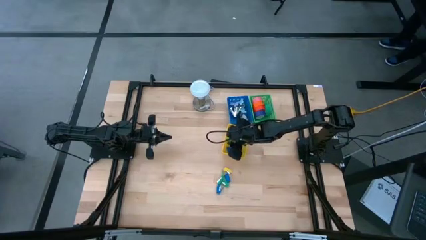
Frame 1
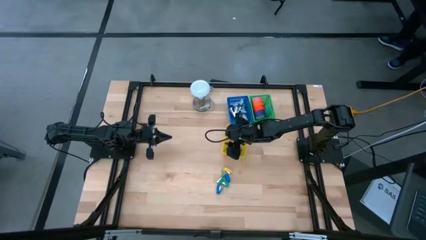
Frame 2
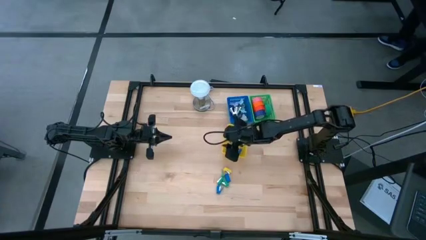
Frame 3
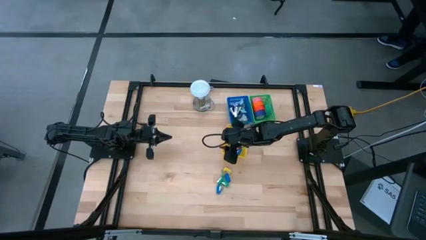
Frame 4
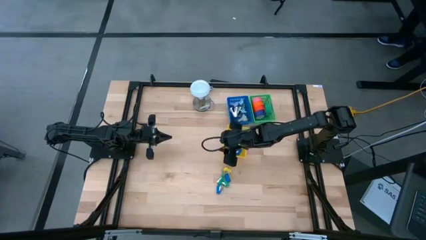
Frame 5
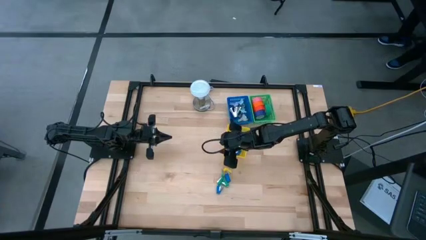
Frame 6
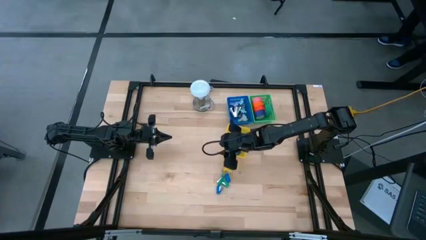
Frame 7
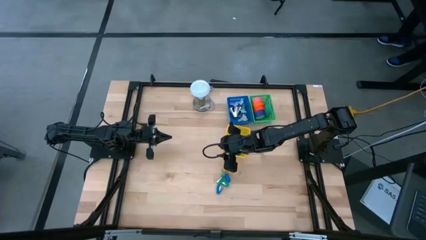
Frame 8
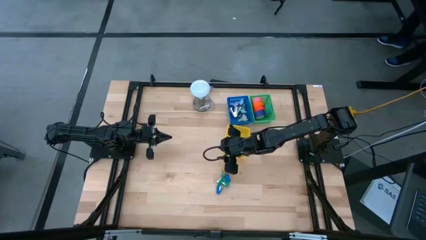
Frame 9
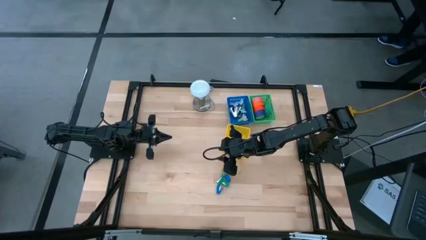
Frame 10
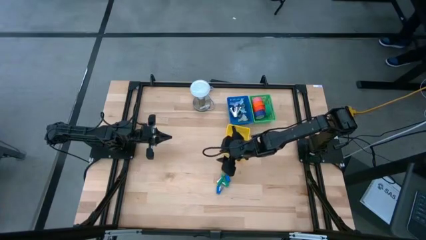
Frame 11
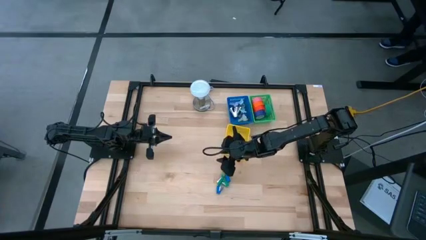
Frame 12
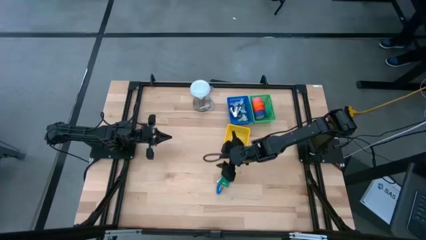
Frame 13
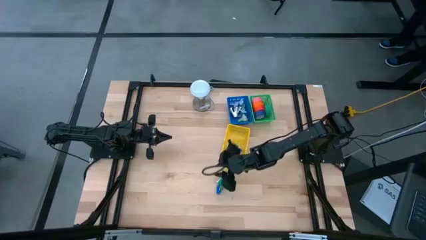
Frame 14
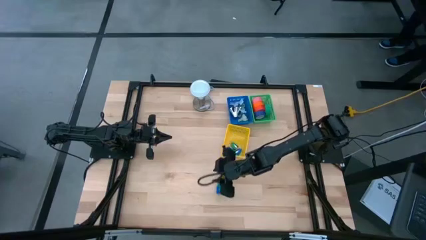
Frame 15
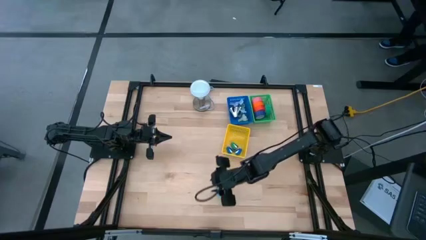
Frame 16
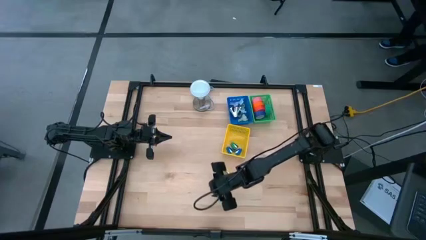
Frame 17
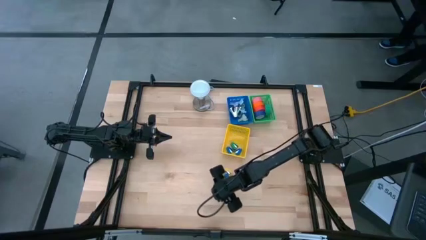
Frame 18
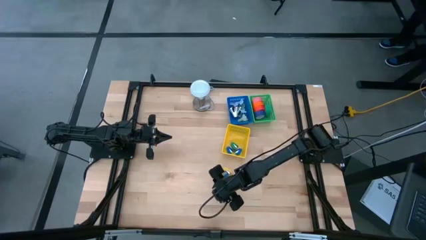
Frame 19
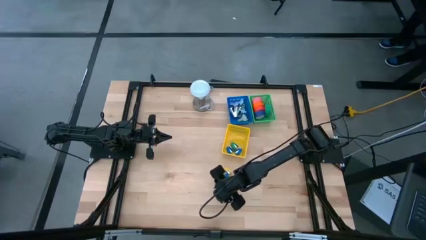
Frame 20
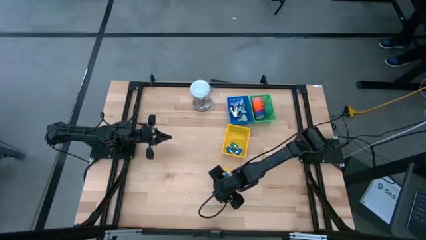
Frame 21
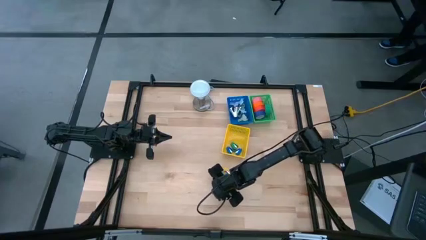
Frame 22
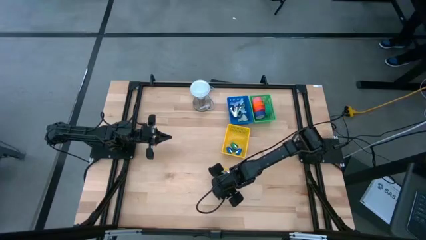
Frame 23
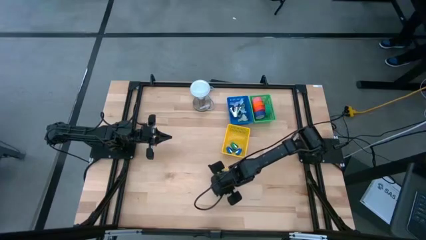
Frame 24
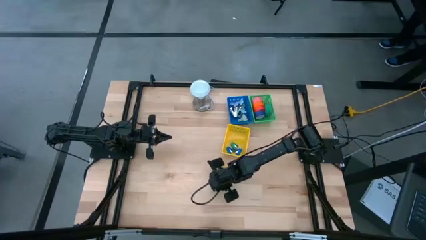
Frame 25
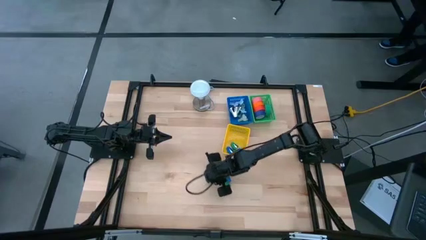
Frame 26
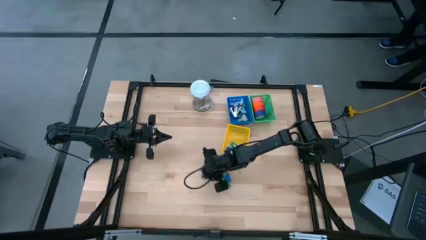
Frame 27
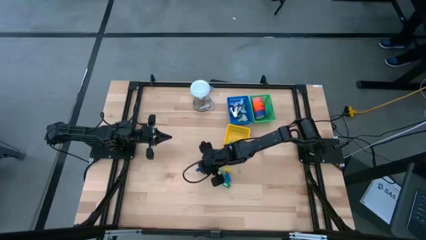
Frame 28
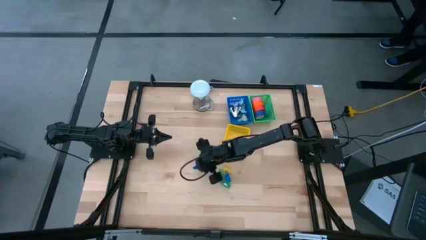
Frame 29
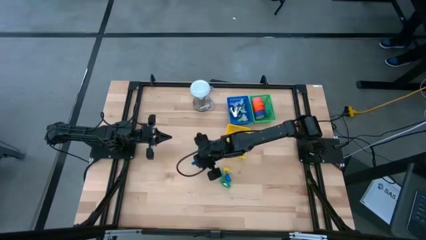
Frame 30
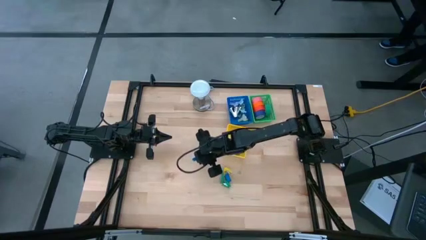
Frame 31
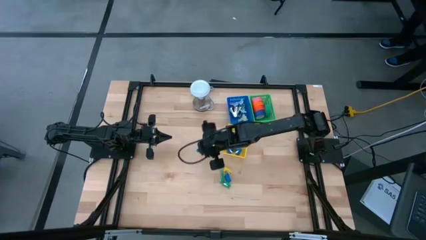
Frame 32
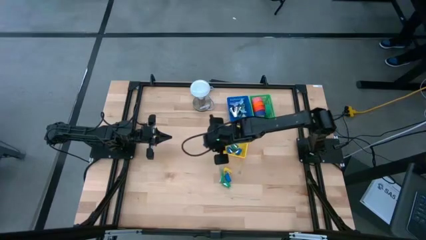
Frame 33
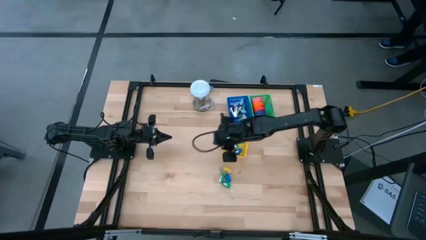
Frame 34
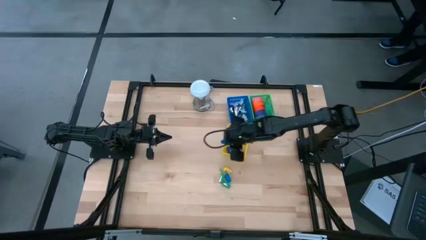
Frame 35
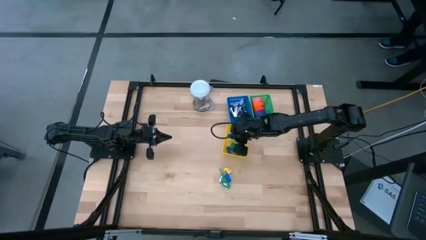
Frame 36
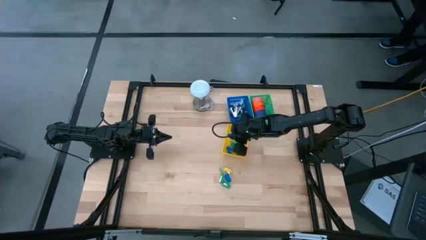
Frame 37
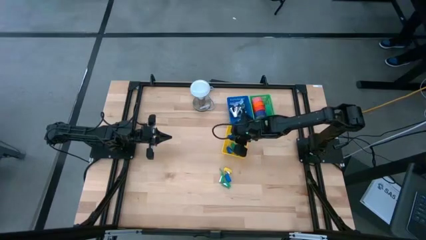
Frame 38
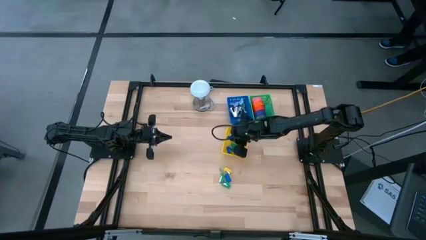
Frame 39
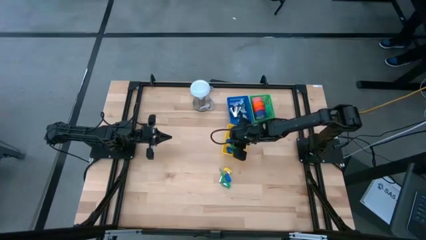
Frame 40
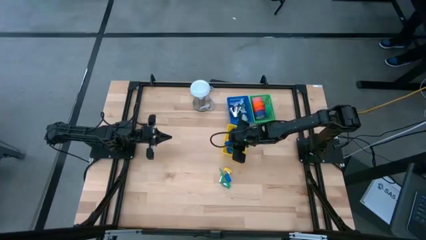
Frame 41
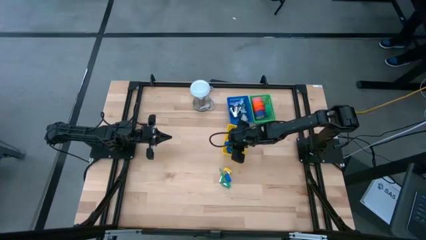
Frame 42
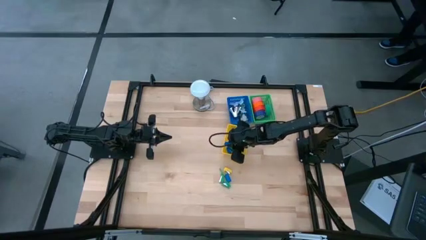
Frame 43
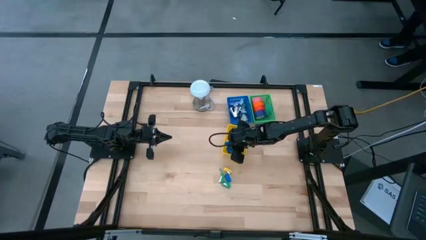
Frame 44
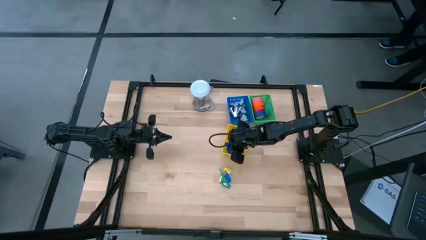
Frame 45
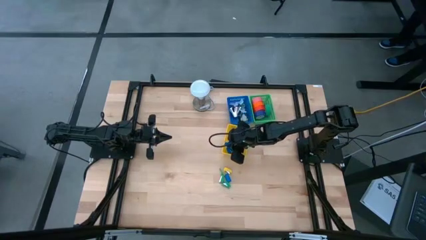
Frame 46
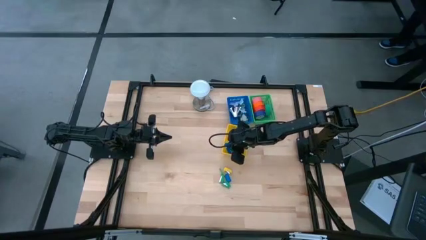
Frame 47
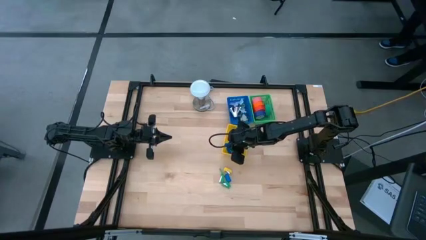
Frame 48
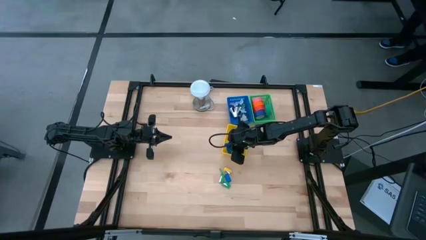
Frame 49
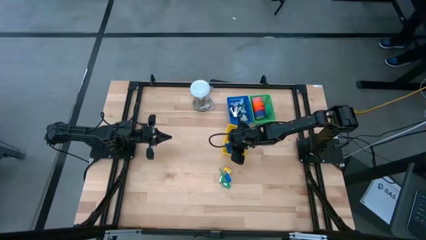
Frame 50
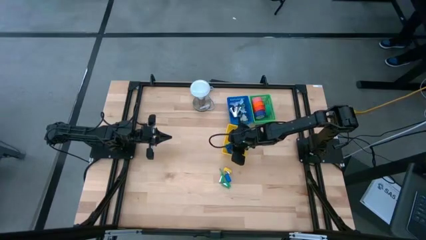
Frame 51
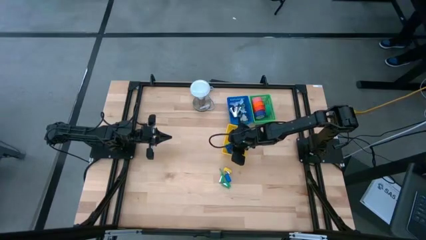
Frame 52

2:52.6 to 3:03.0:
Task: Pick and place Stapler, Stapler remover, tape
Put the blue stapler into the yellow bin

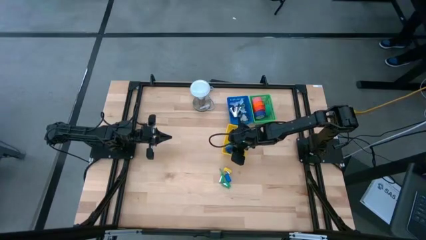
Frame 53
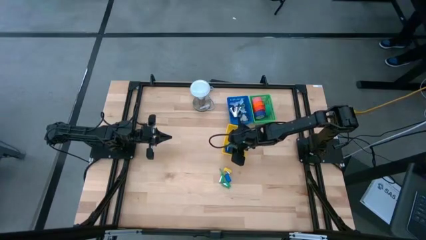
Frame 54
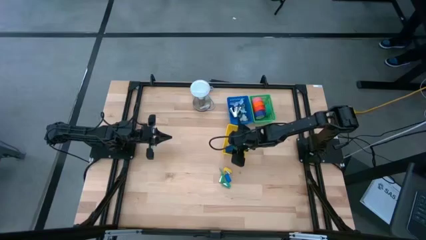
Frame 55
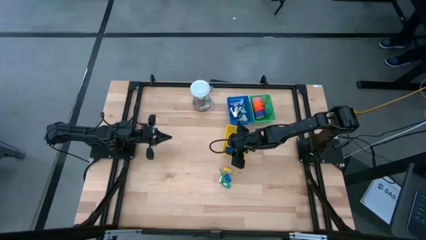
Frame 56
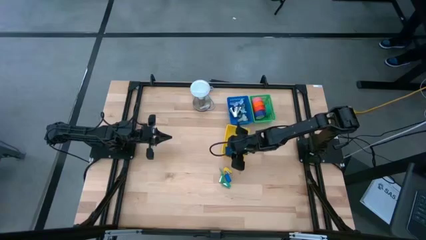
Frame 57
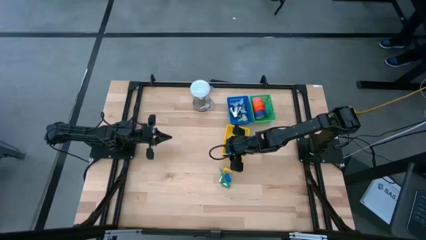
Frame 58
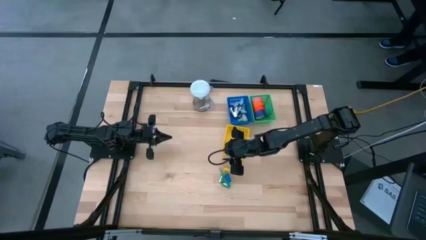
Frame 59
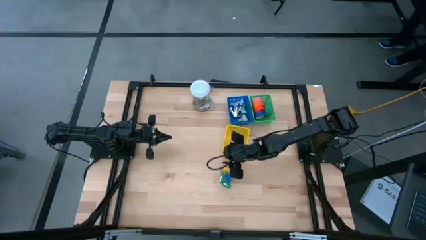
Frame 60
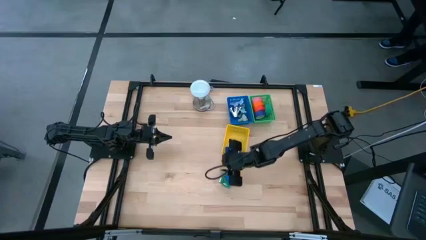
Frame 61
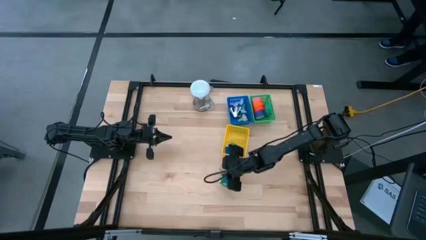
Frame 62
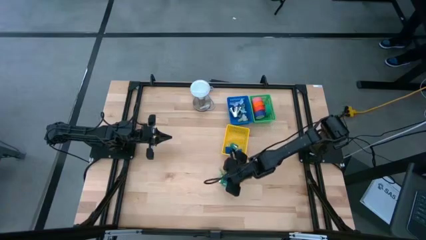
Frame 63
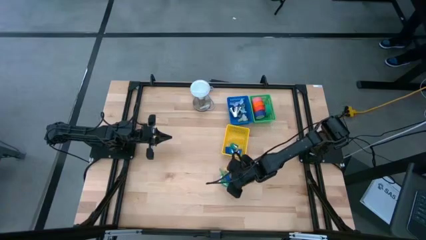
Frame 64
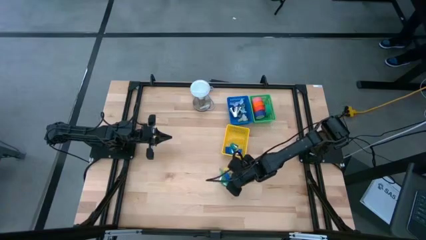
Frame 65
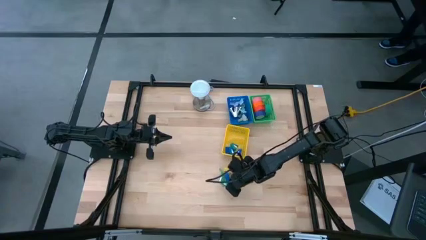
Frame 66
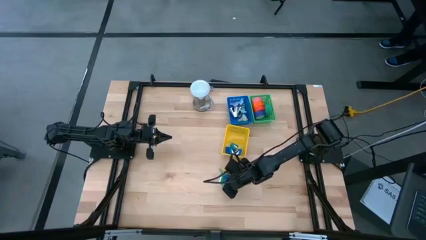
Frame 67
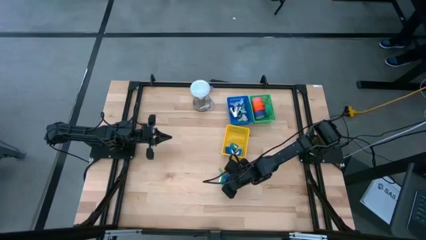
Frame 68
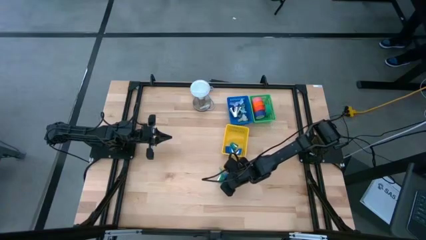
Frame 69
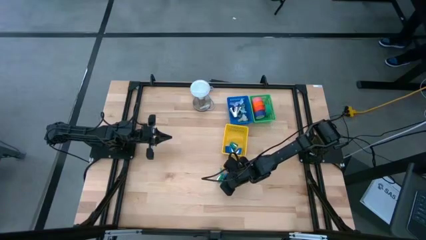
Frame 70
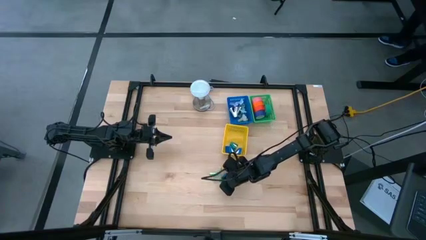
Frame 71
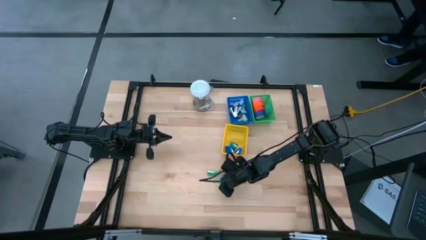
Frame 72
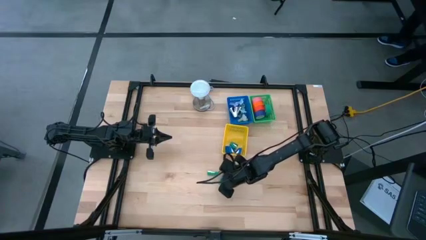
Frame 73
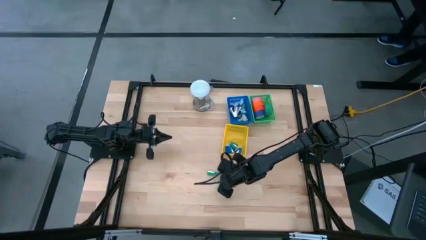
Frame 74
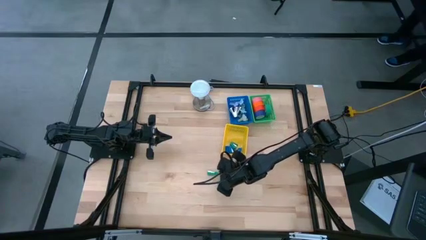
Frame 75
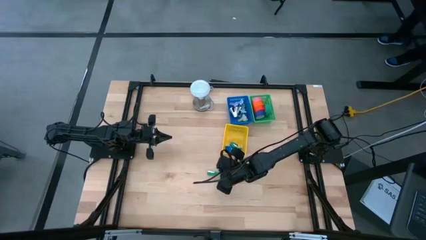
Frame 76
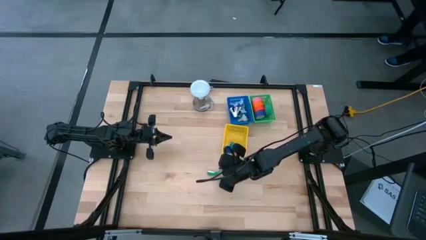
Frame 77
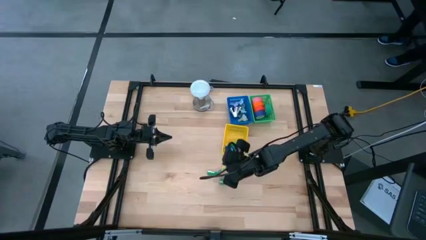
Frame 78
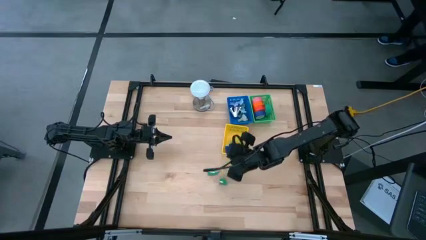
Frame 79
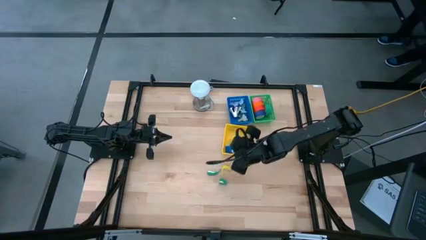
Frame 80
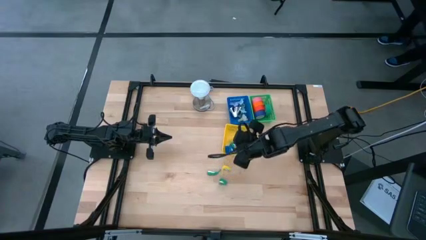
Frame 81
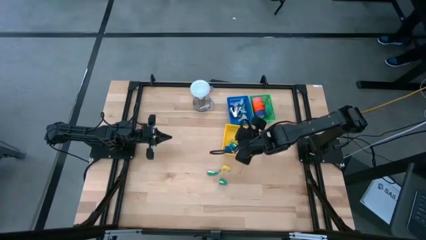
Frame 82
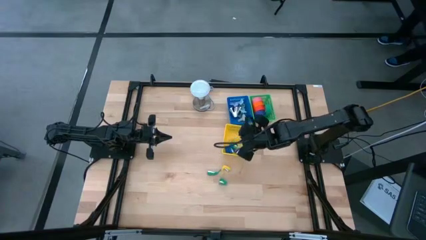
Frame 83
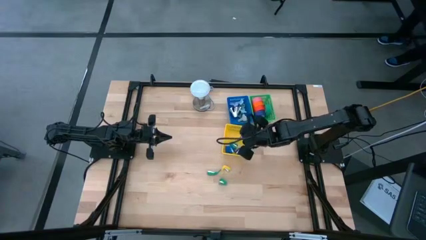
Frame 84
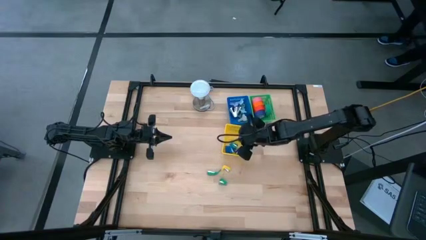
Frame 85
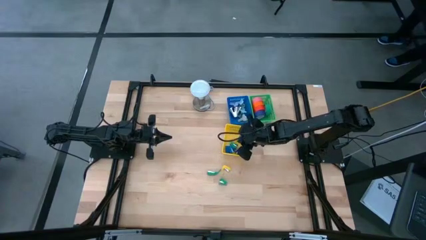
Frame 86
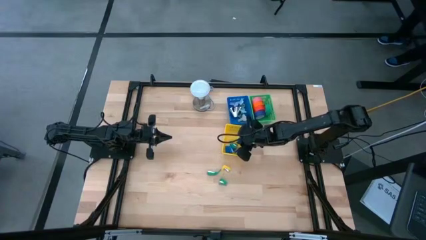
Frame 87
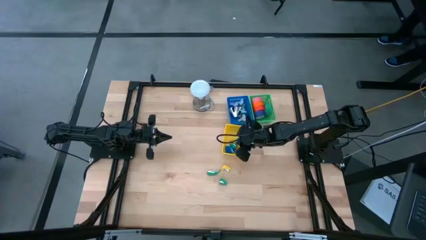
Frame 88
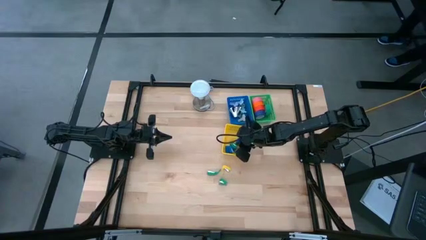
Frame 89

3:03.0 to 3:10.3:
Put the blue stapler into the yellow bin
